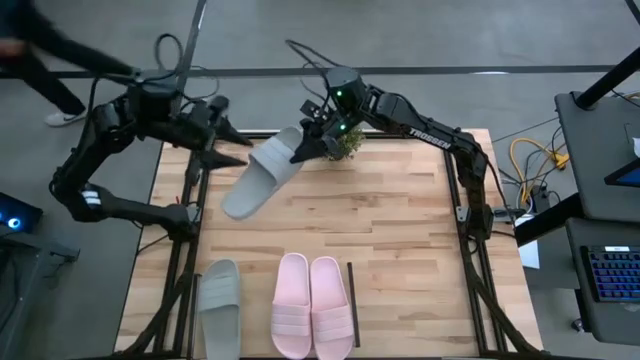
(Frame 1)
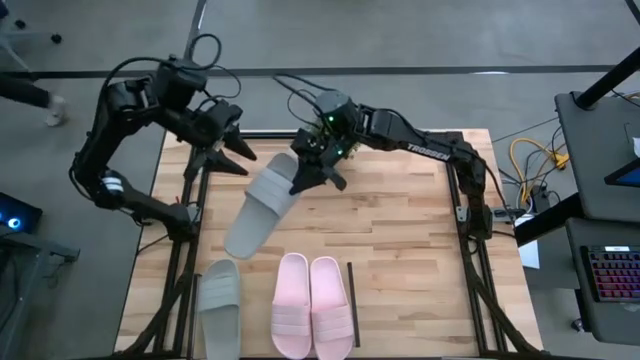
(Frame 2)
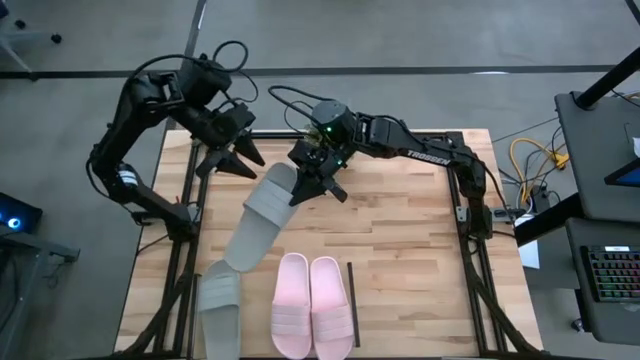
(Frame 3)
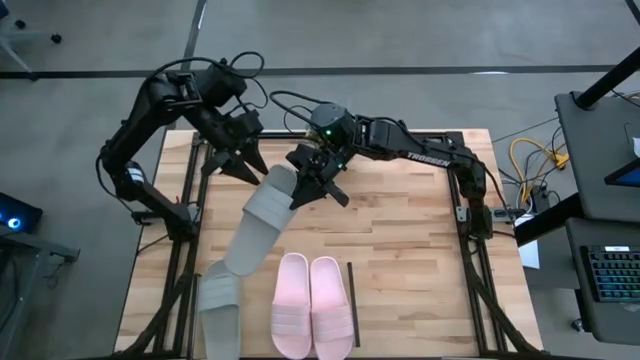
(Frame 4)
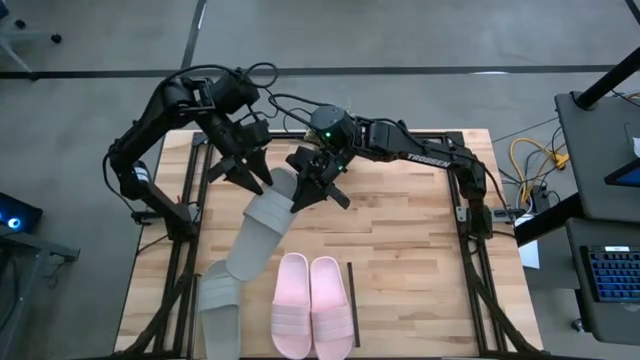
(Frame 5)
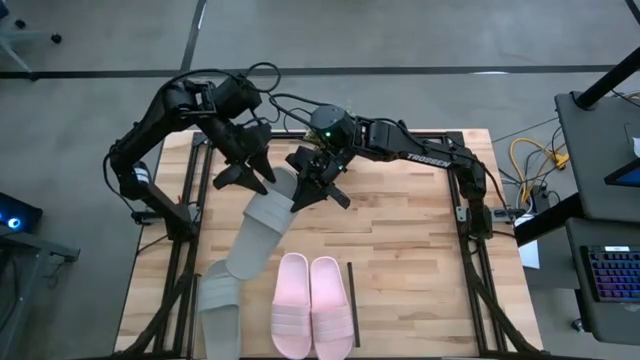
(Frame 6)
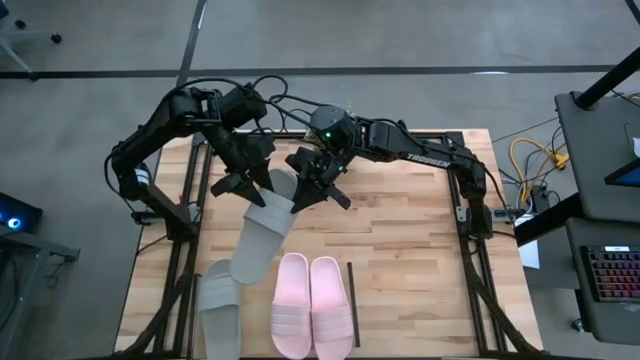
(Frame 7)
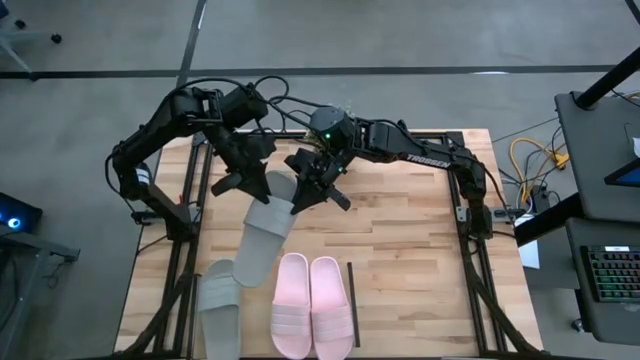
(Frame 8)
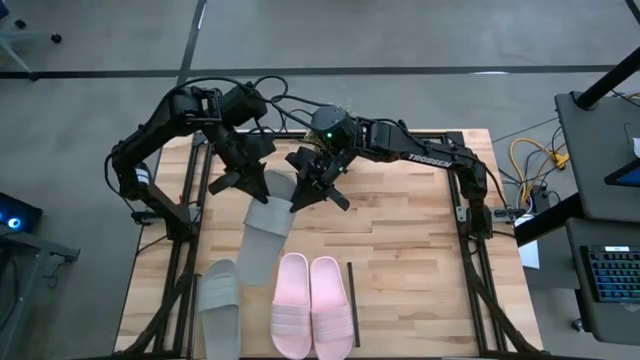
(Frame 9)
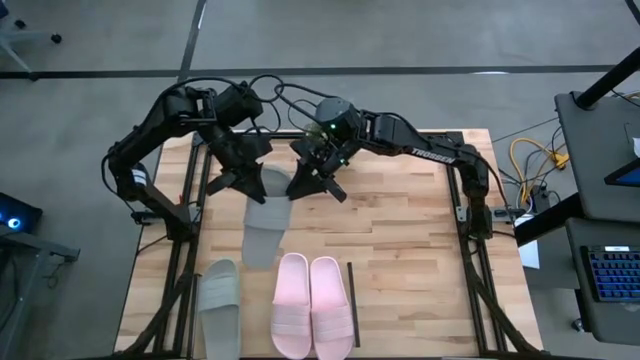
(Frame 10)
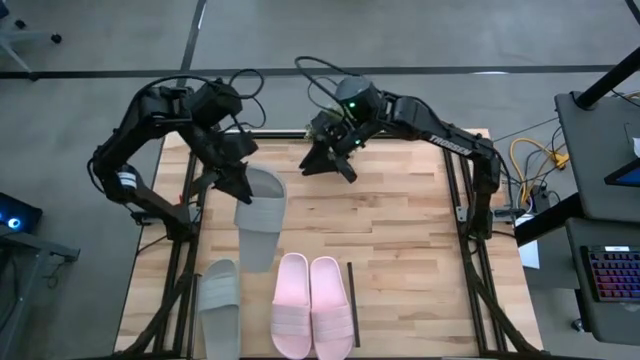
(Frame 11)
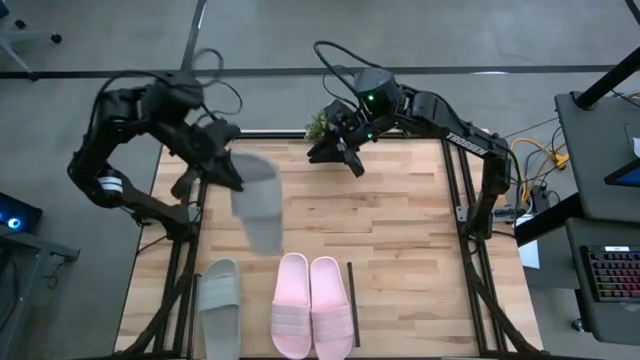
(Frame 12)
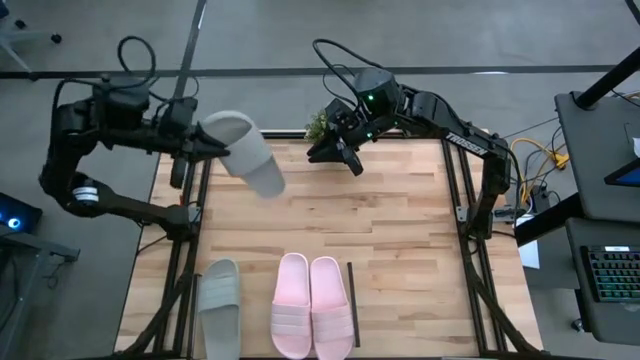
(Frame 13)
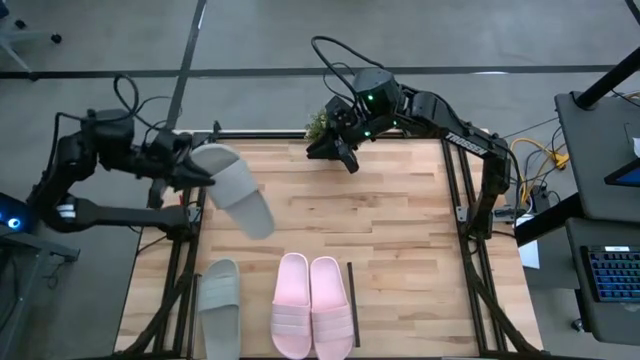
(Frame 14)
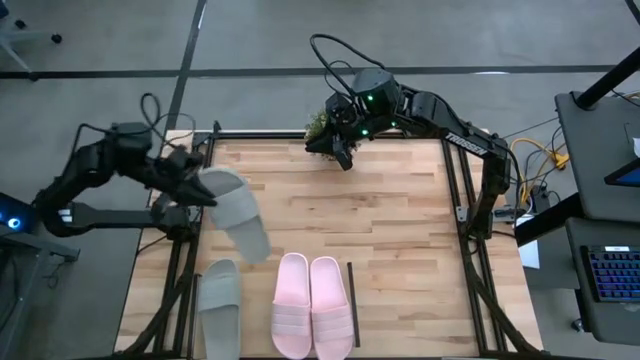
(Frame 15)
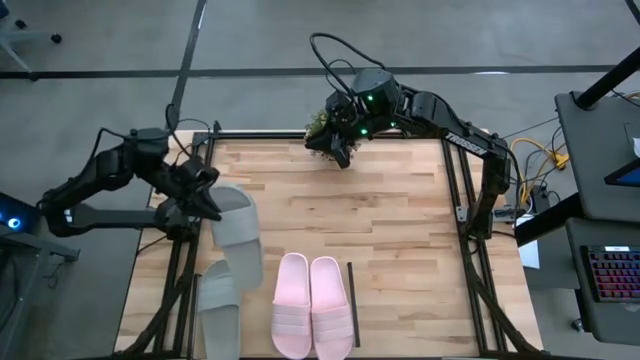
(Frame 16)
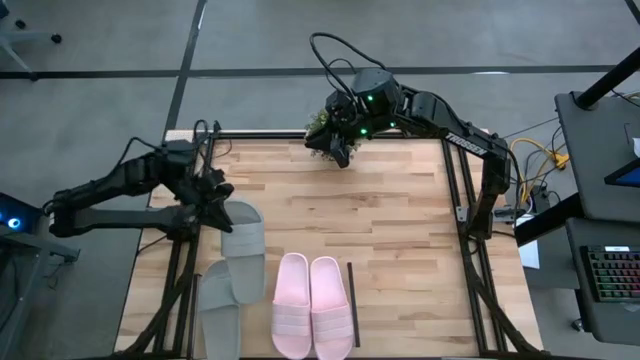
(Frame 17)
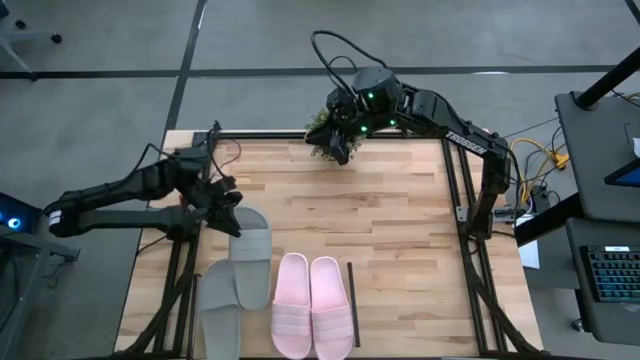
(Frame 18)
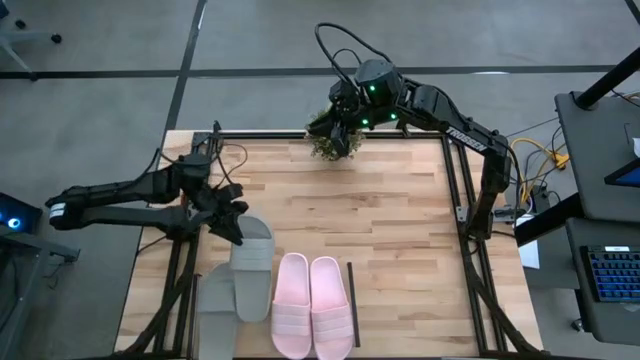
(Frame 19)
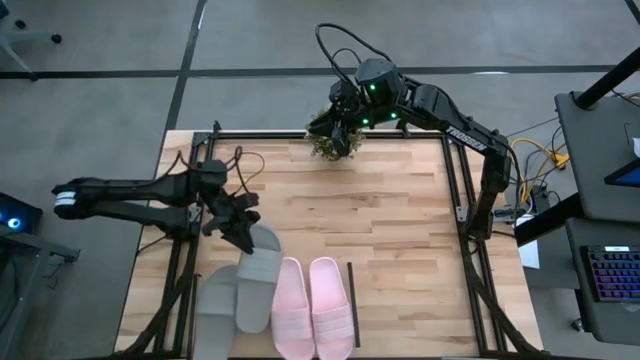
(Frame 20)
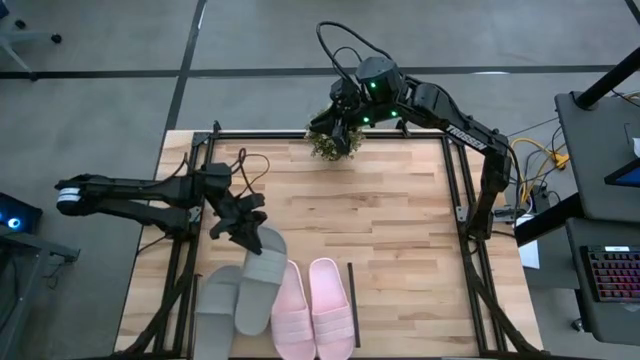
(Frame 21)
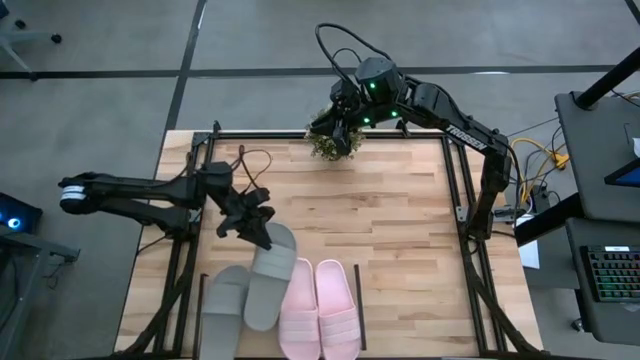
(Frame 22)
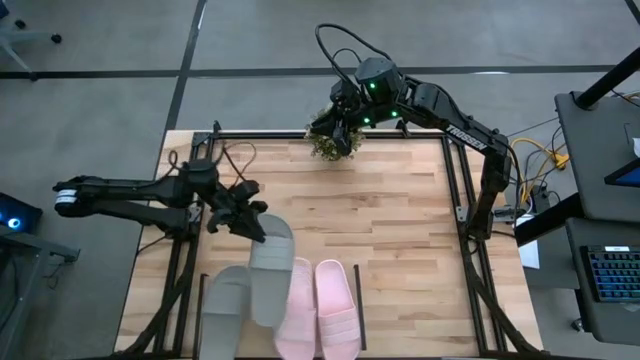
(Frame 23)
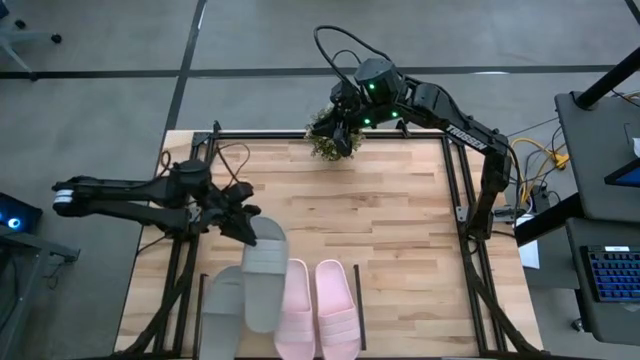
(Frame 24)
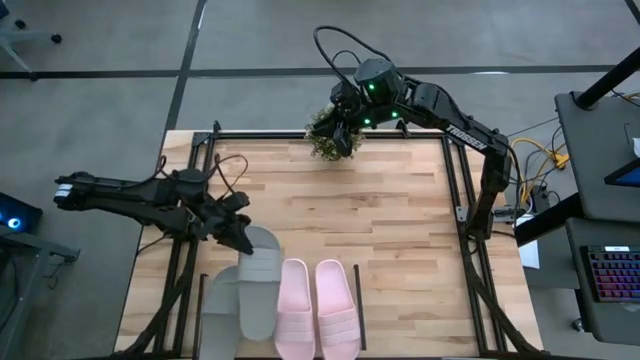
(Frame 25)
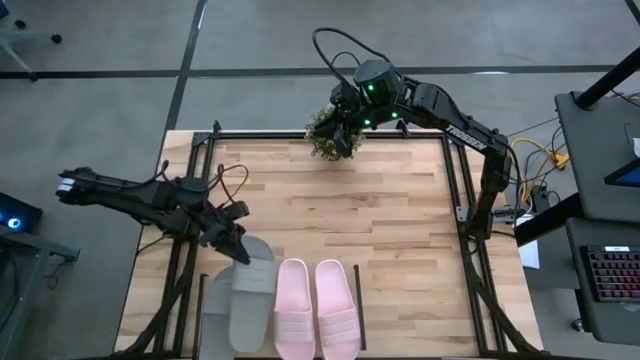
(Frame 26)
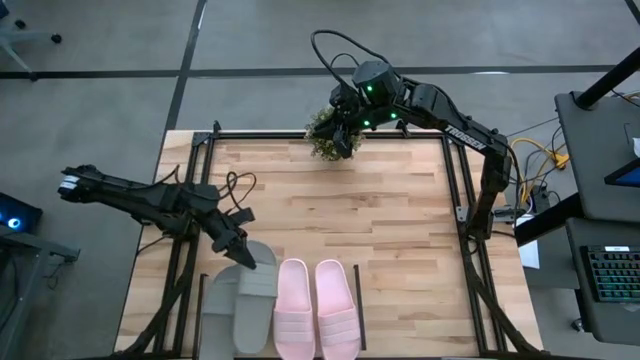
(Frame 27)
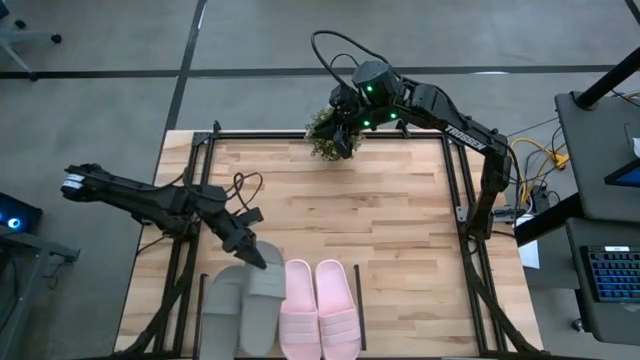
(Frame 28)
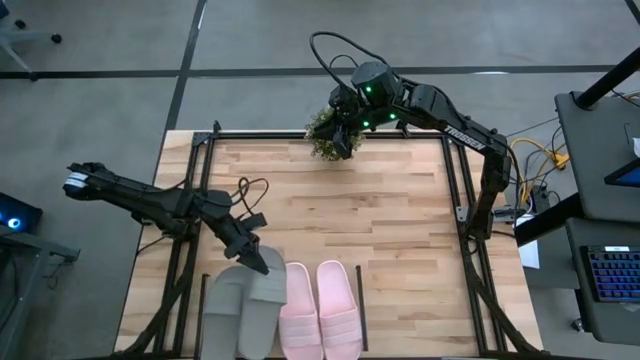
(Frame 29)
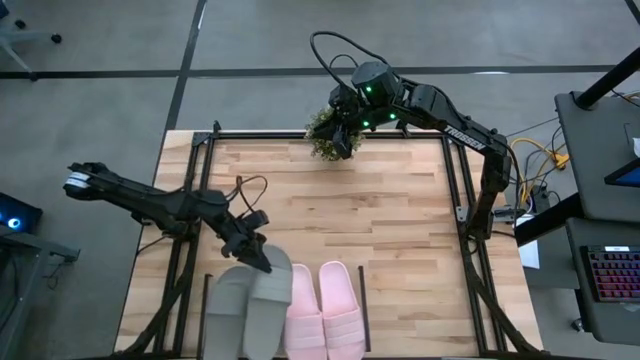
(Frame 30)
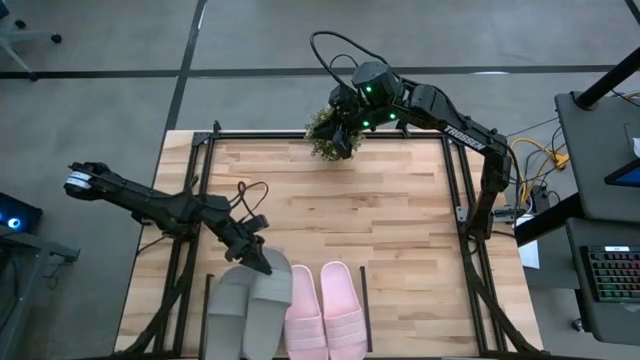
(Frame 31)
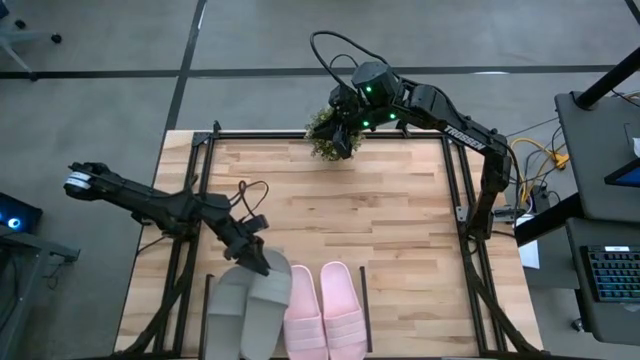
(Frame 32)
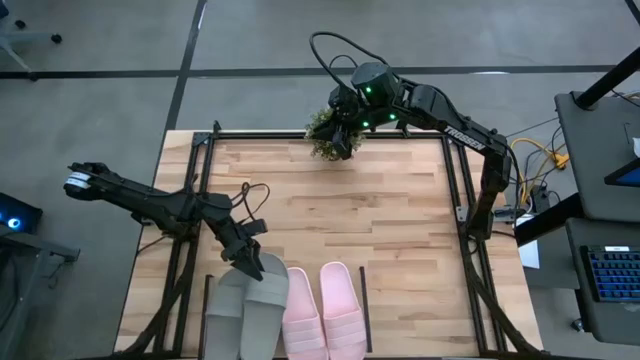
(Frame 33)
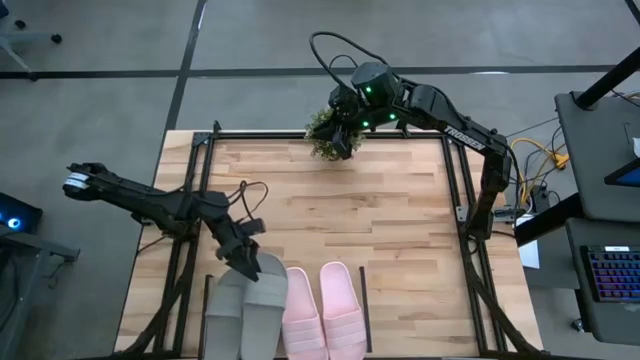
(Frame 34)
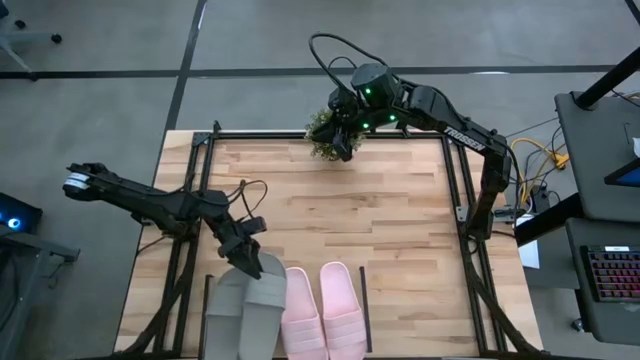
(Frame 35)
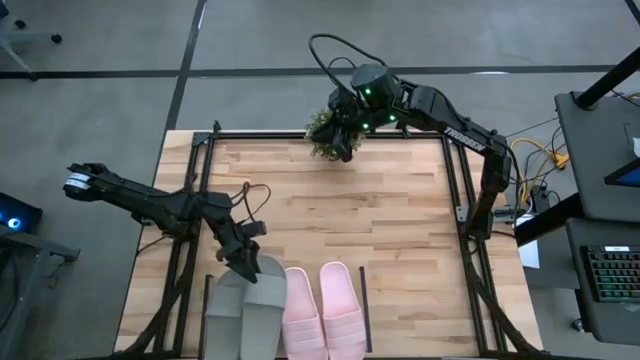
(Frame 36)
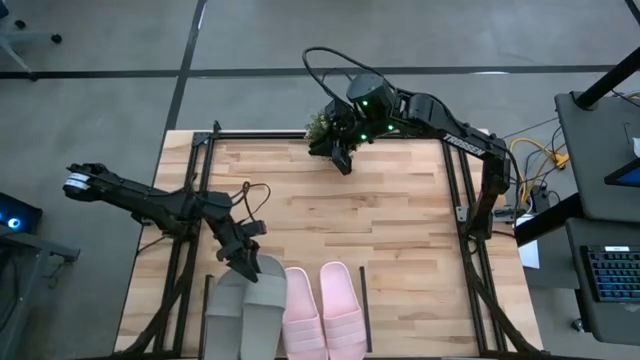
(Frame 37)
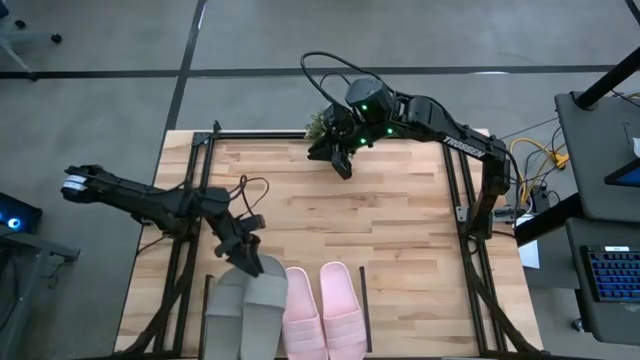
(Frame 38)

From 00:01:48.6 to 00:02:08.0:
Task: Pick and place slides into the shelf
Put the gray slipper on the shelf

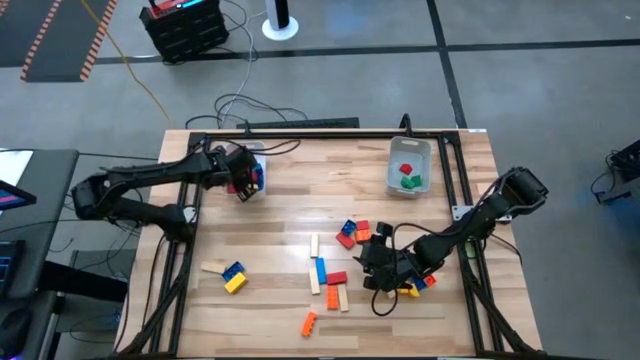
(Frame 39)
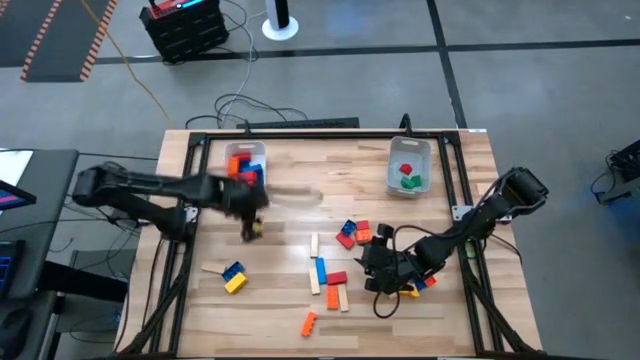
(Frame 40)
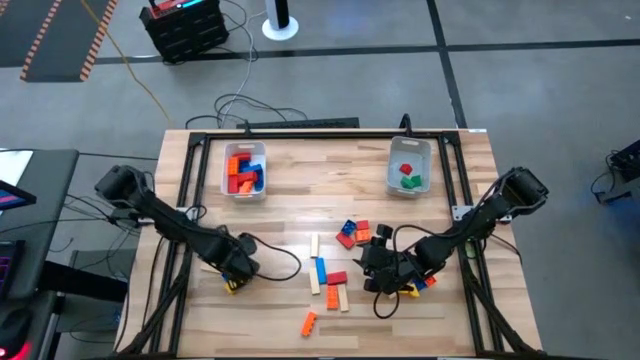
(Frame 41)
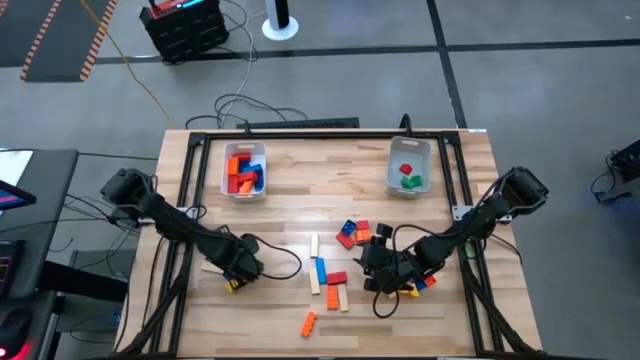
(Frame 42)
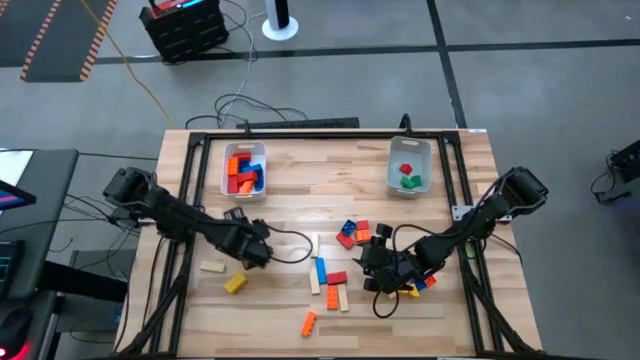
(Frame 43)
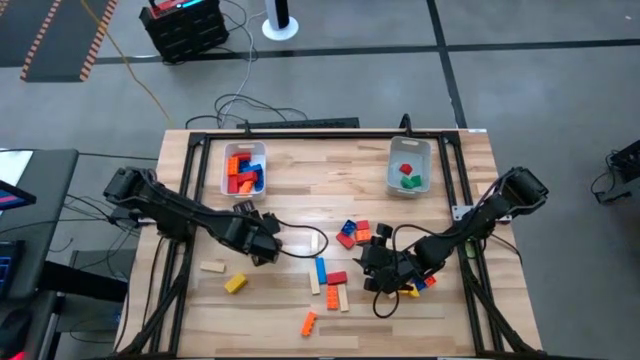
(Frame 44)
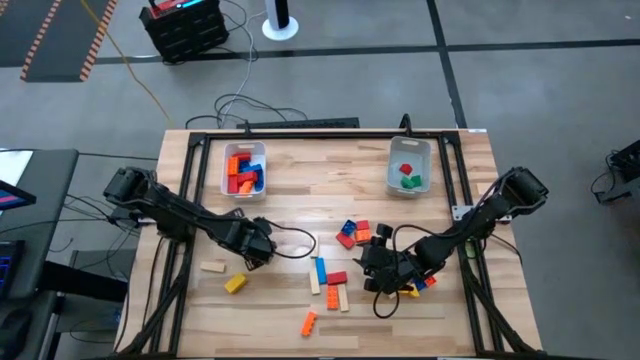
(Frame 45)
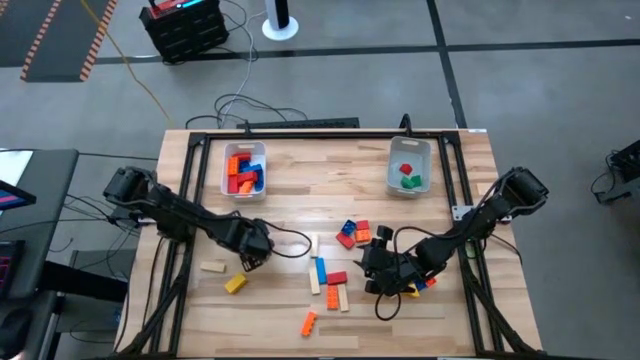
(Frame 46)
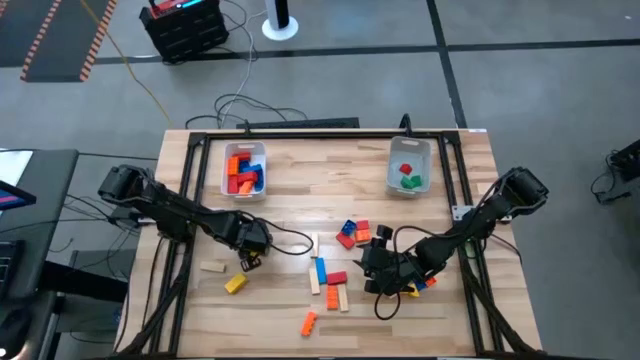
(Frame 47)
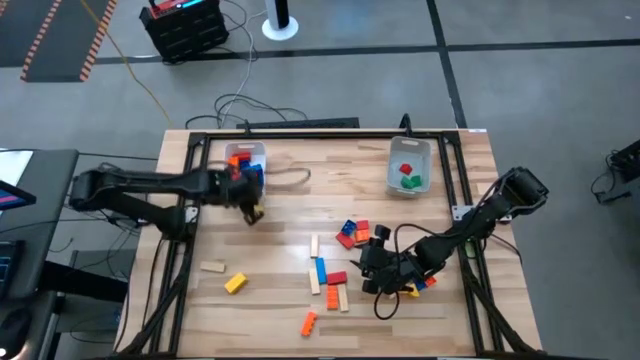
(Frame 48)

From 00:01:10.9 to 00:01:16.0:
Task: Sort blocks by size
Put the large blue game piece into the white bin
